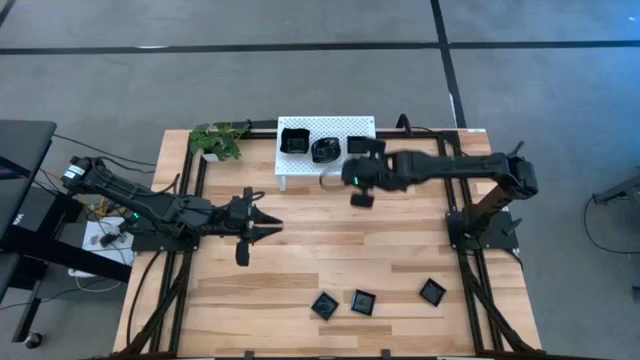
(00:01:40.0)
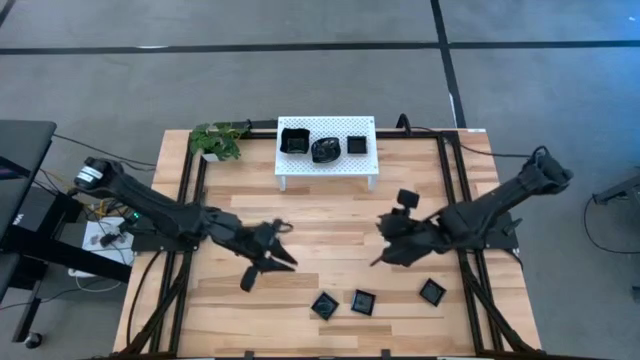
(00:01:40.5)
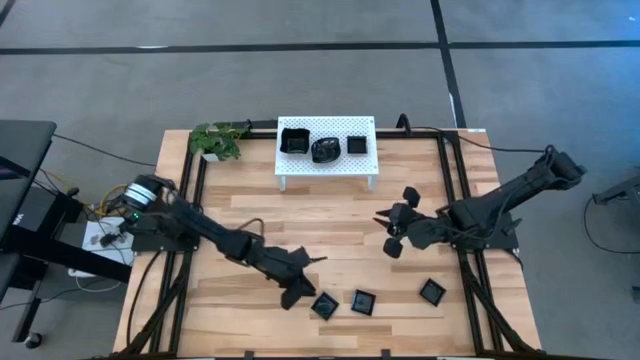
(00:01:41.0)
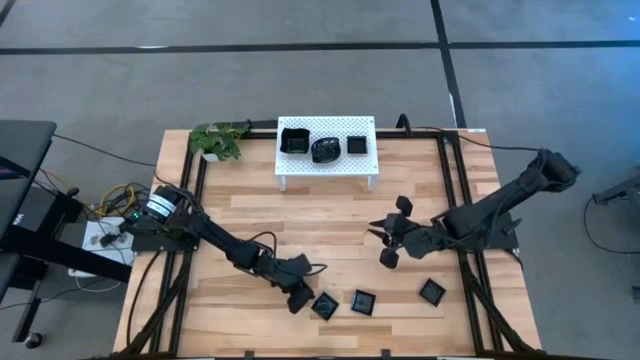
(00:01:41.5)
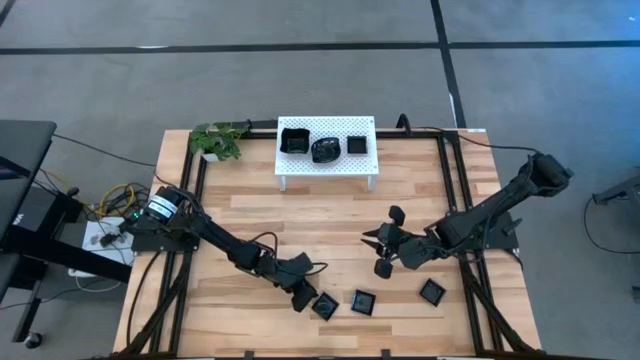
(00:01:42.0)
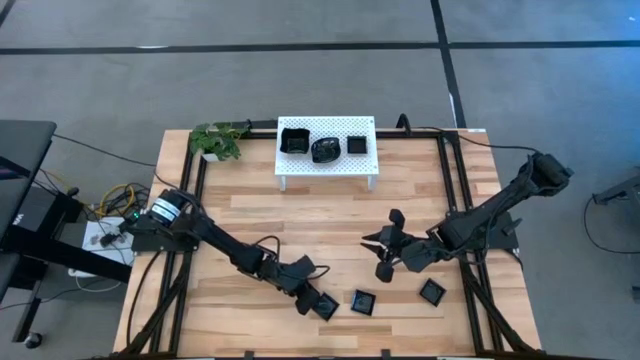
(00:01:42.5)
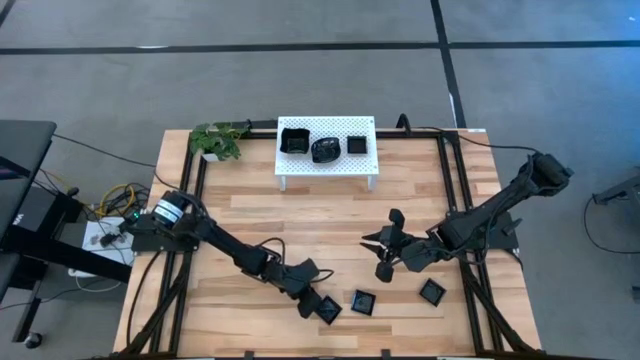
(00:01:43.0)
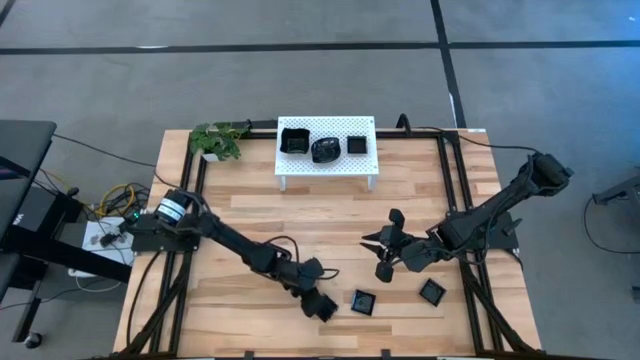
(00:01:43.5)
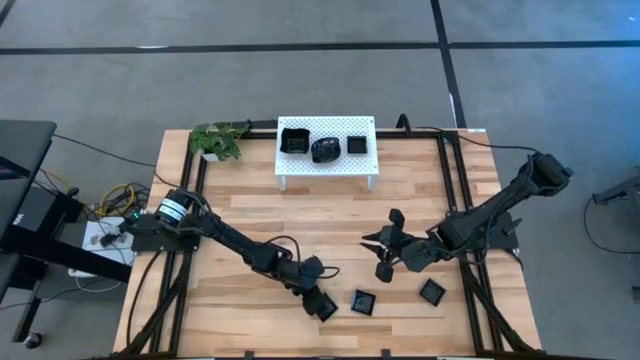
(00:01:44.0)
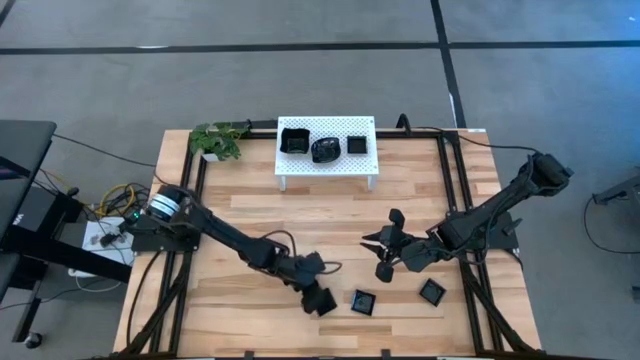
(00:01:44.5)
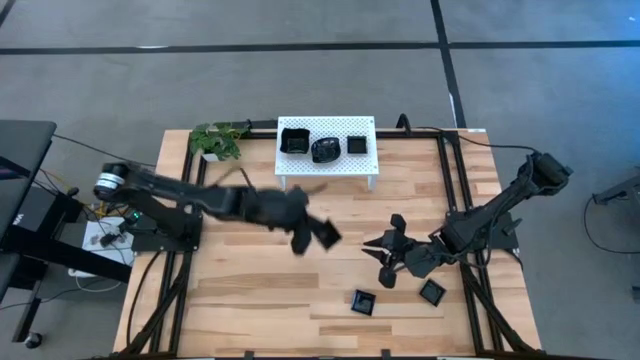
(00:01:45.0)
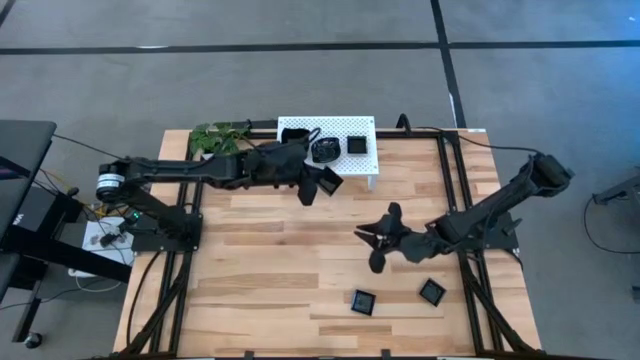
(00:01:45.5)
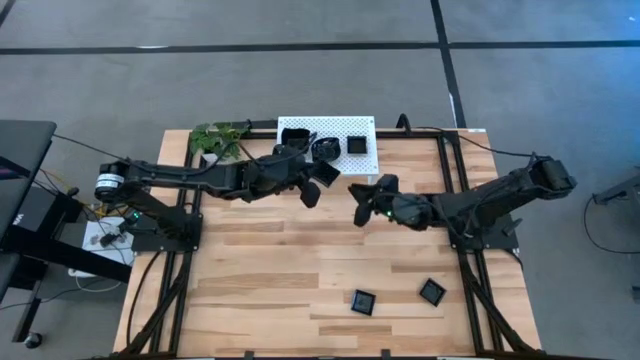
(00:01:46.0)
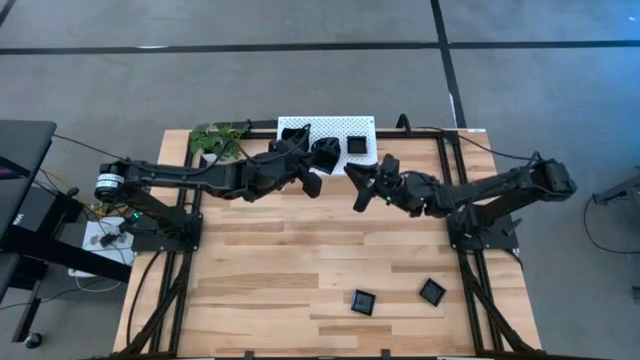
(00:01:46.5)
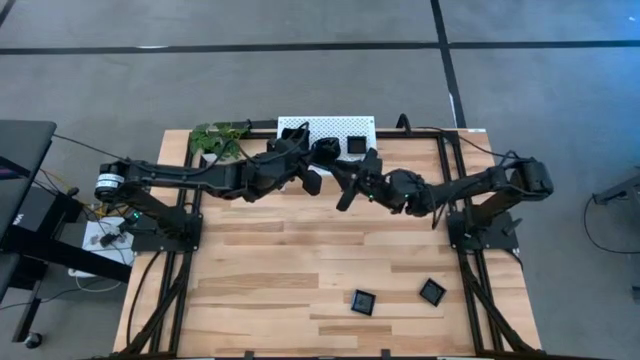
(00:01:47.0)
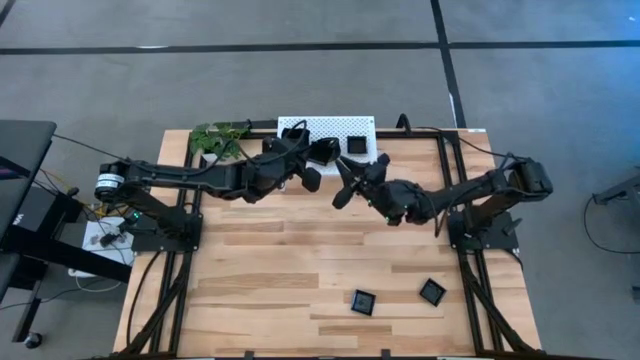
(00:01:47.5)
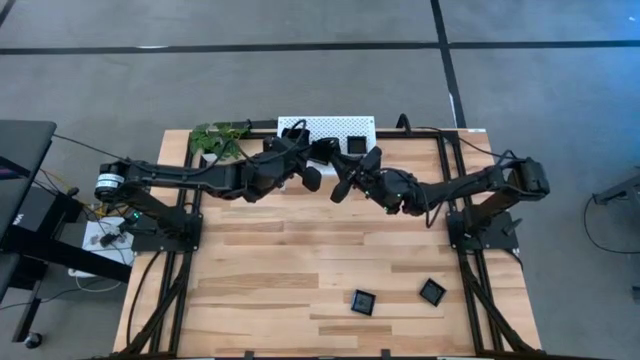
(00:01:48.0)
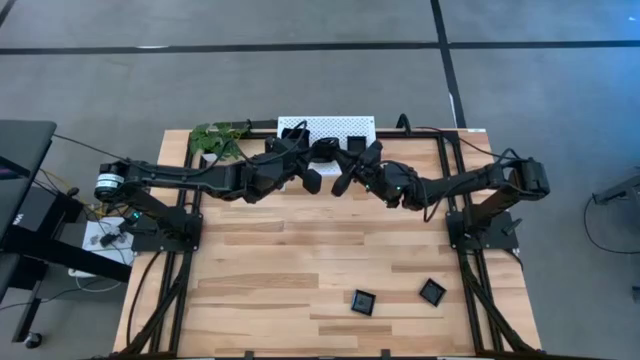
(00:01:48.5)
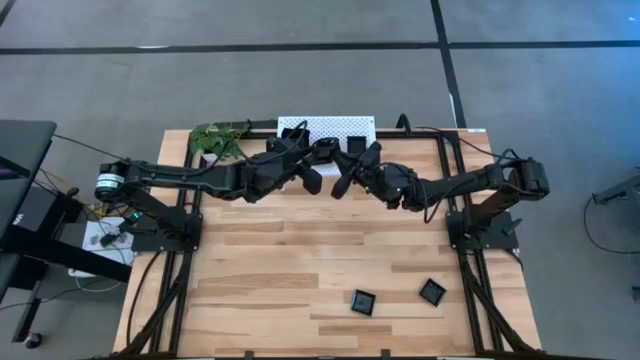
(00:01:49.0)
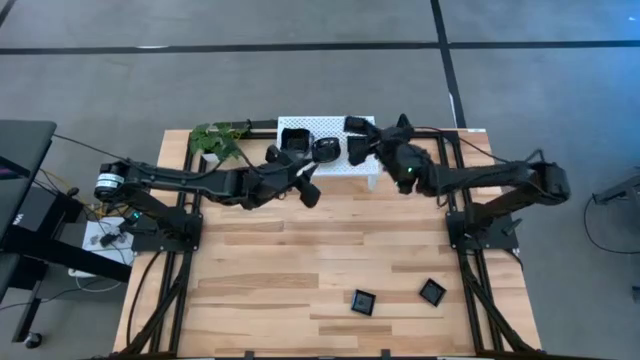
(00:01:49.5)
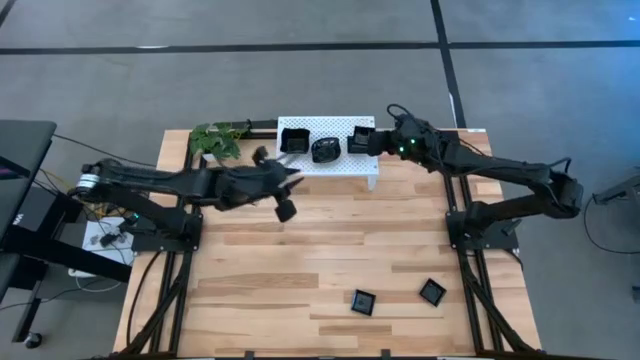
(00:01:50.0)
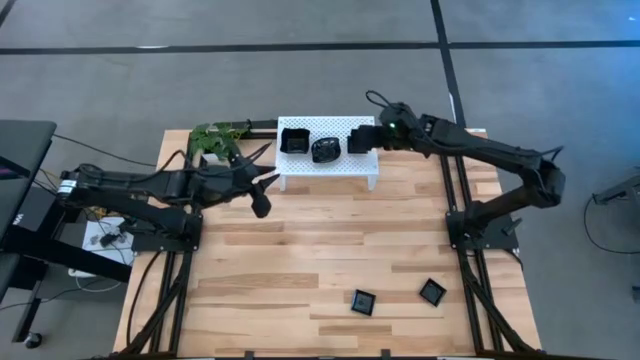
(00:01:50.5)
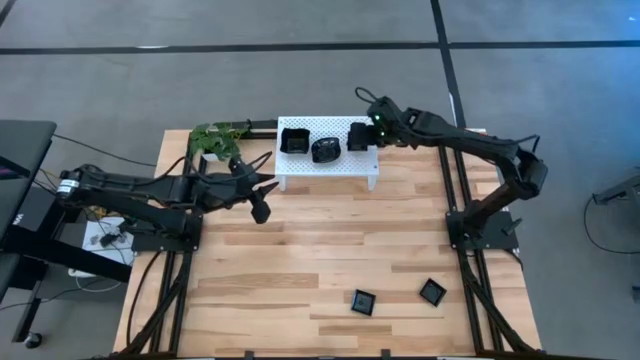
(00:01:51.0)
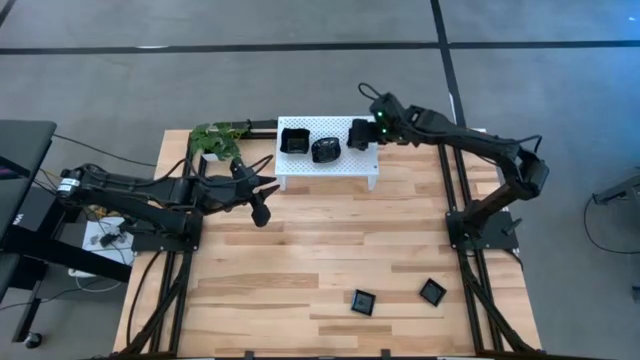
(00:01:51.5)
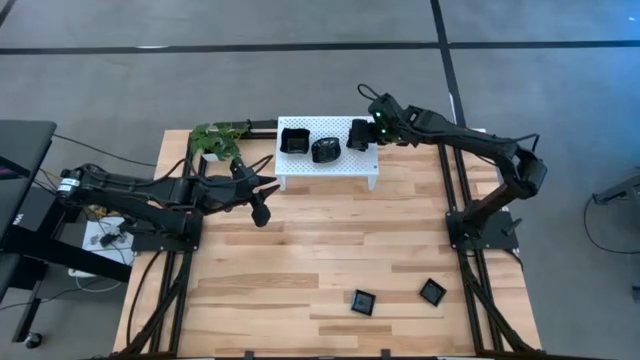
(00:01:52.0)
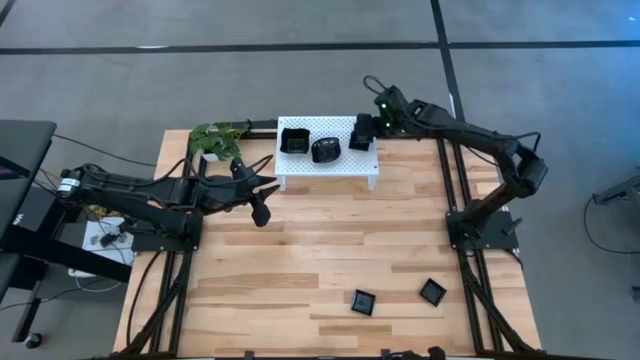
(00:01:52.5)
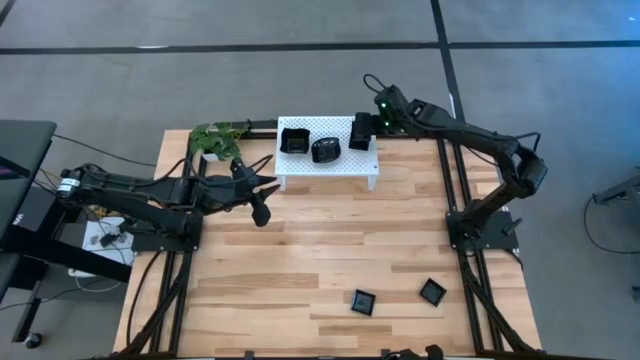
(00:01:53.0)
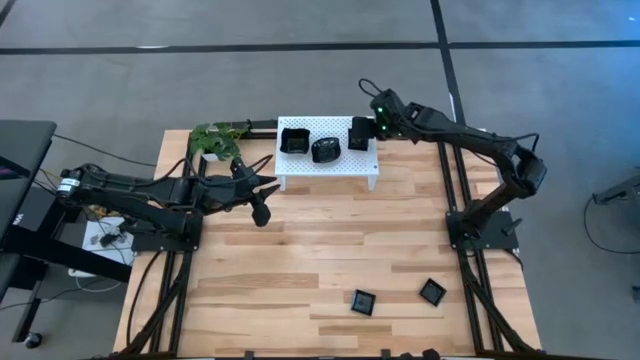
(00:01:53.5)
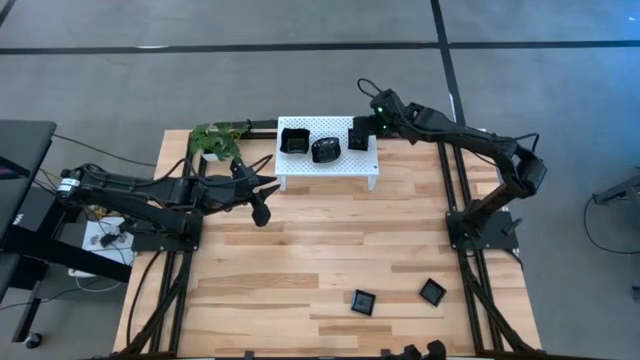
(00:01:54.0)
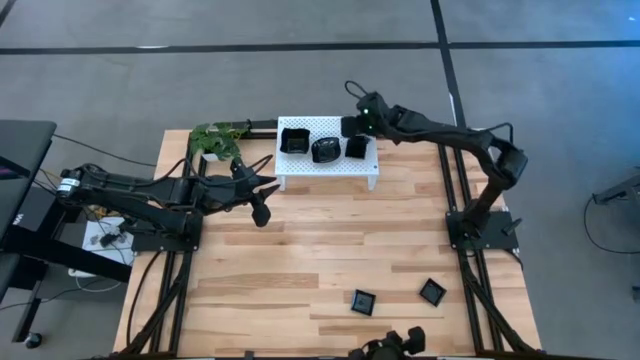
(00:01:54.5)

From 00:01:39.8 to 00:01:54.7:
Task: Pick & Place Mini shaped plates
Stack the black square plate on top of the black square plates on the shelf

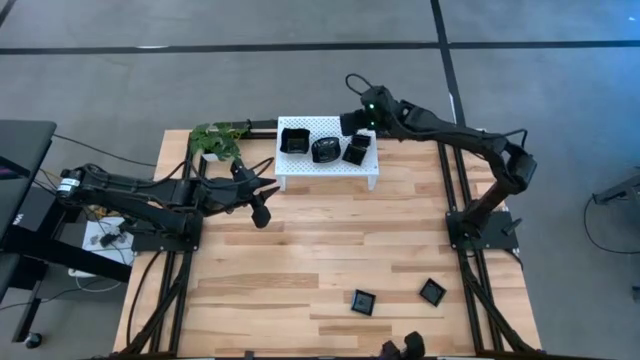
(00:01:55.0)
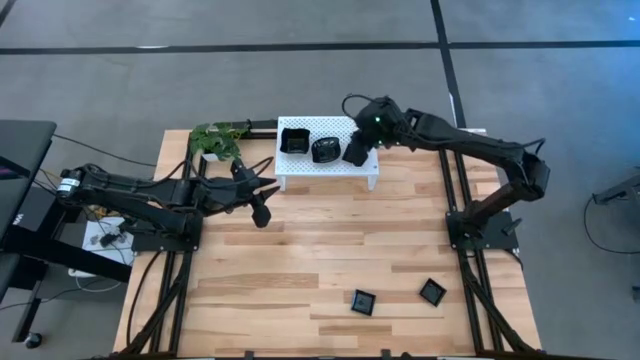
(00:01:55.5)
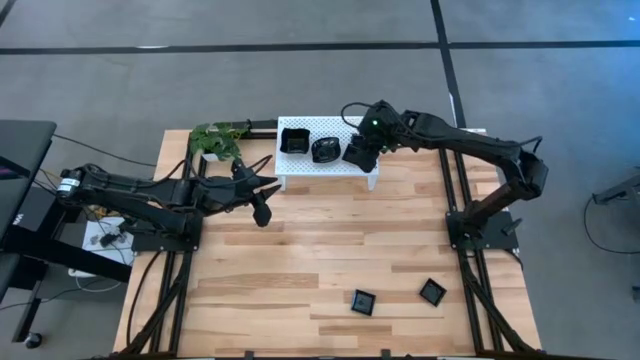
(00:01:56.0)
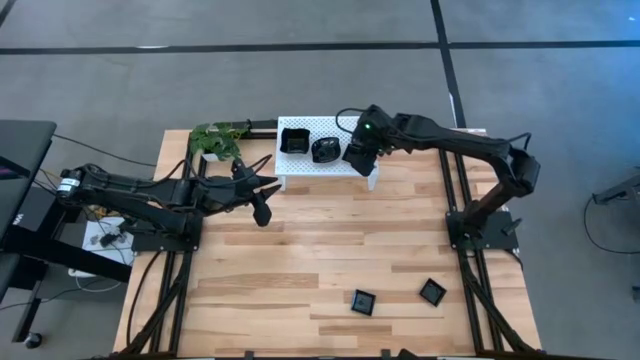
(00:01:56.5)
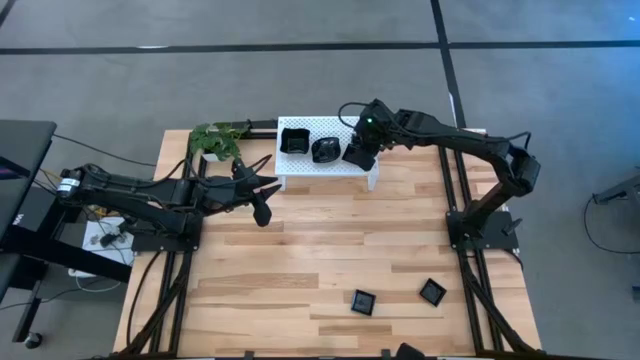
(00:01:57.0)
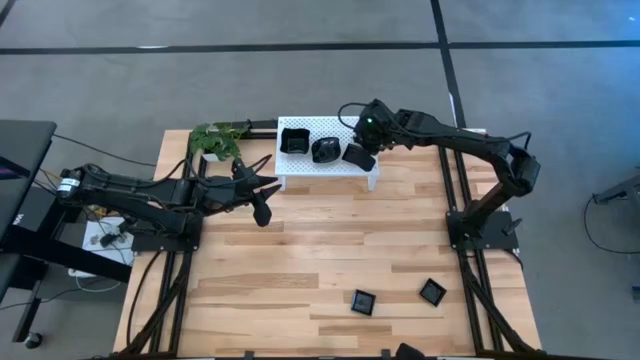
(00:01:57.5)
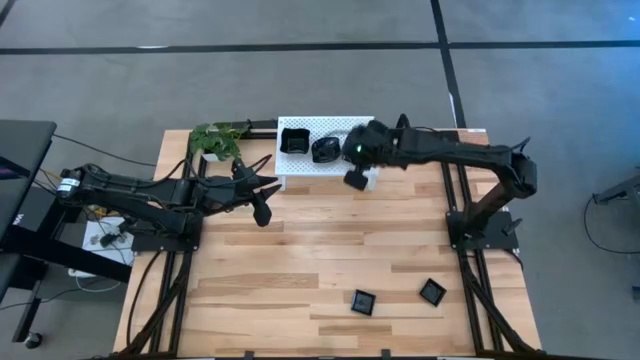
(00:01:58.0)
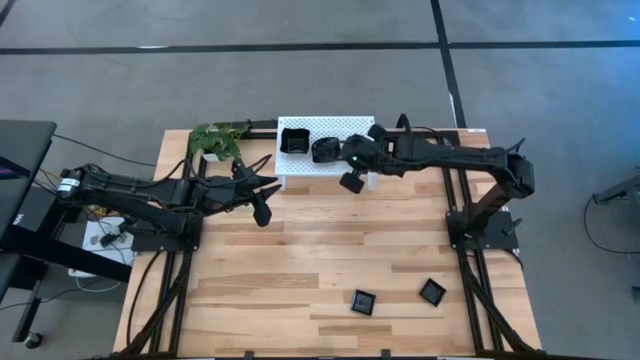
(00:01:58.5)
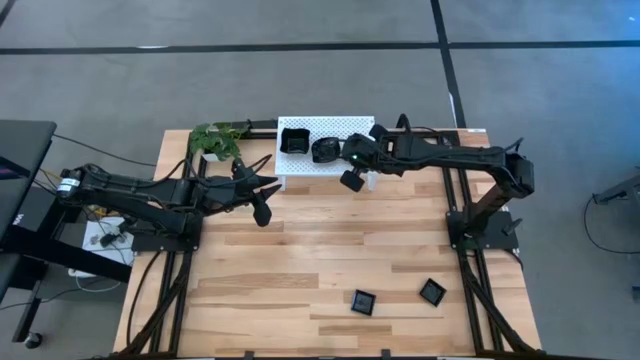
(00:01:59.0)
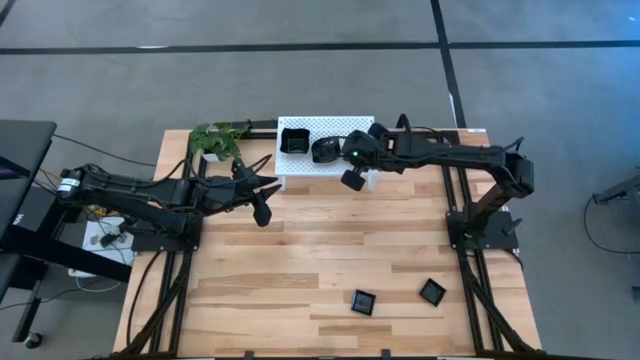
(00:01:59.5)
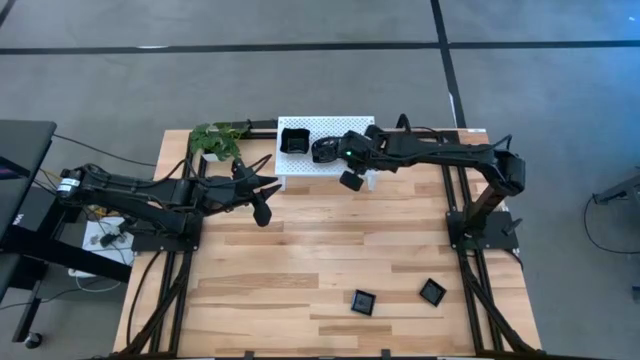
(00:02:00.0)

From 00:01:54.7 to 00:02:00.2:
Stack the black square plate on top of the black square plates on the shelf
